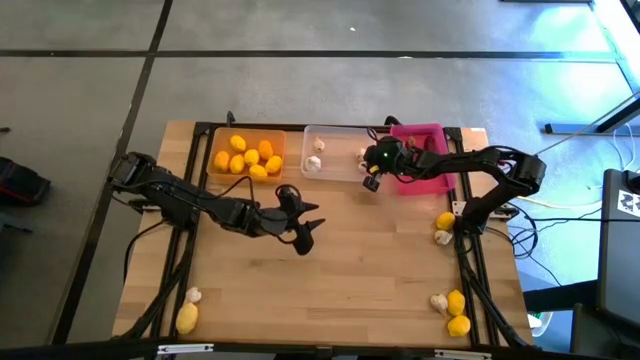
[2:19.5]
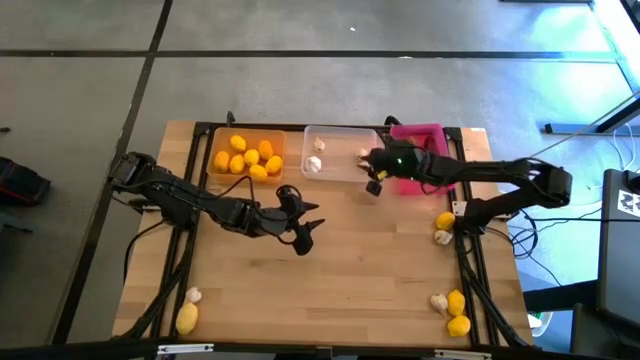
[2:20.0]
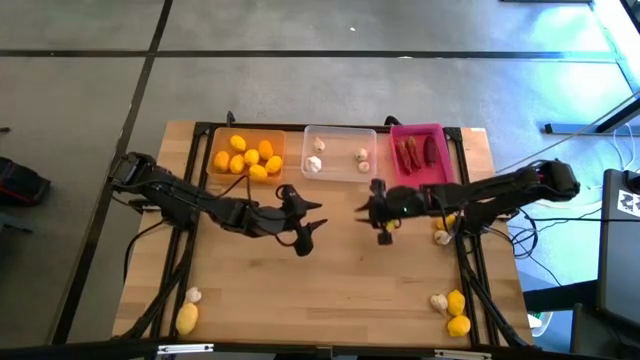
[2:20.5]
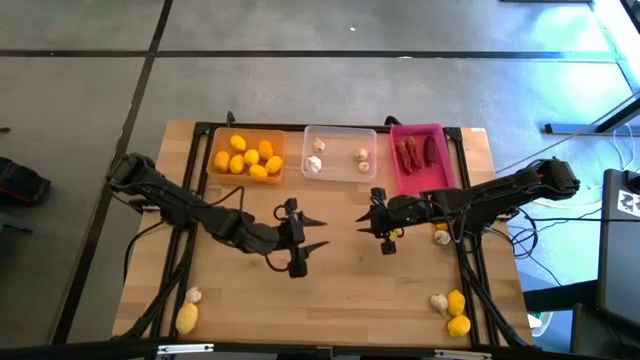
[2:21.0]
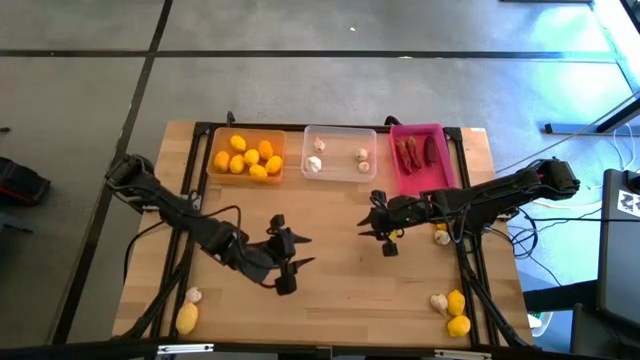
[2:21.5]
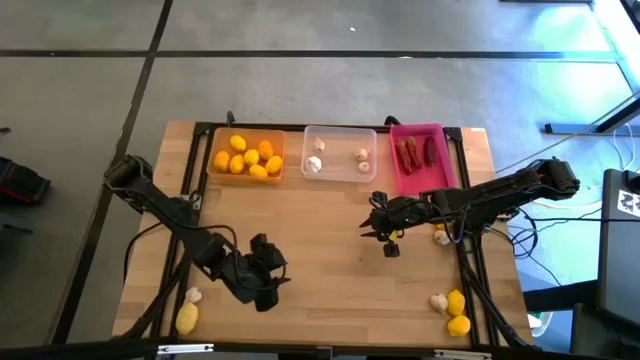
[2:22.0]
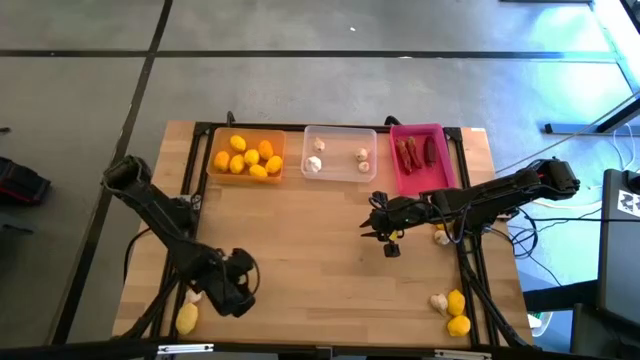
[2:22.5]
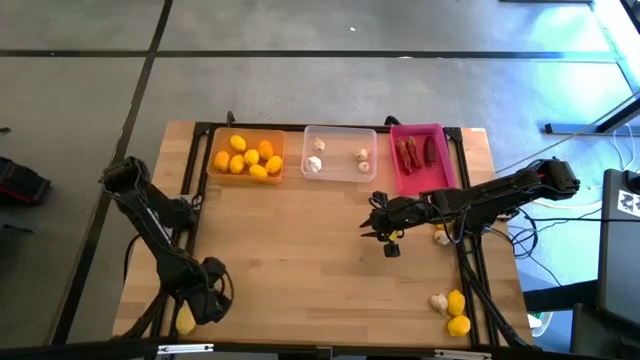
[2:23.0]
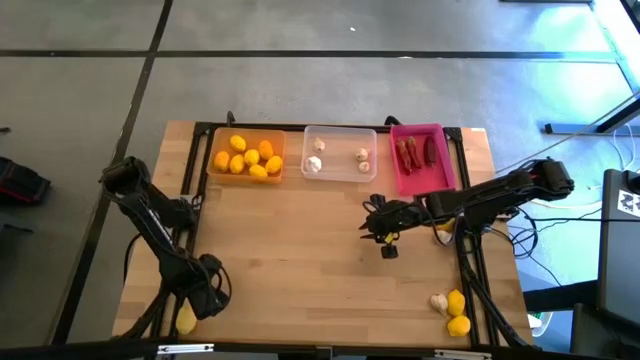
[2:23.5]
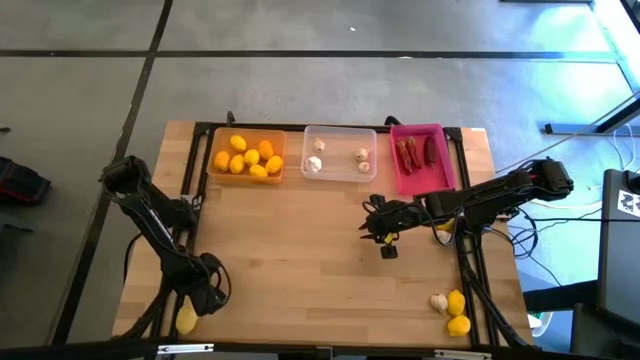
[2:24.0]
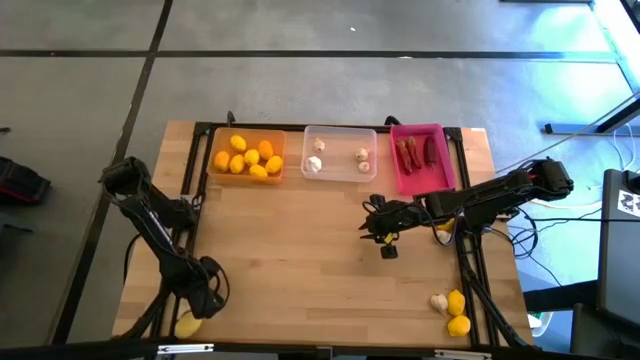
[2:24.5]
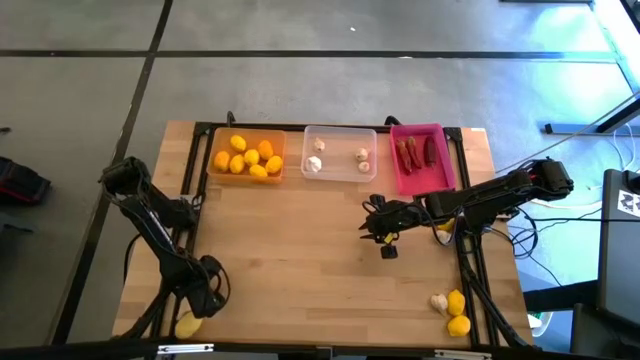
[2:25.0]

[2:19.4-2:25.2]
Task: Sort produce into baskets
Put the white garlic into the transparent bin

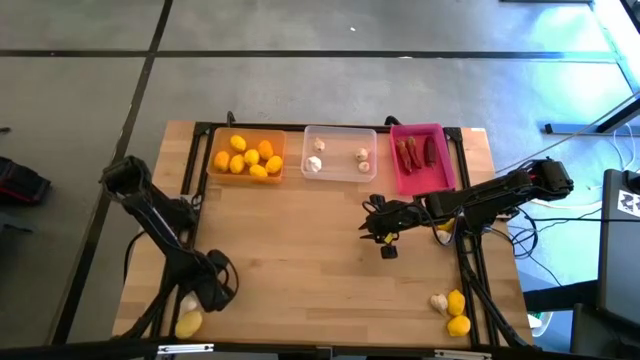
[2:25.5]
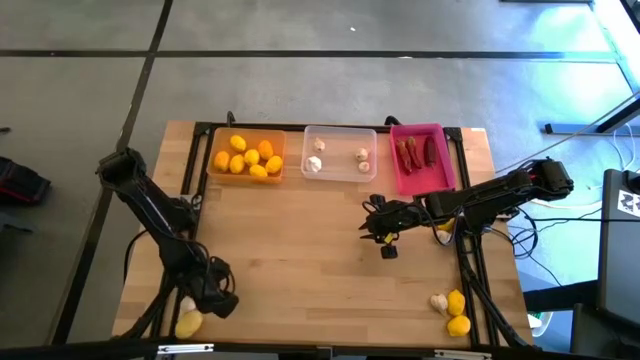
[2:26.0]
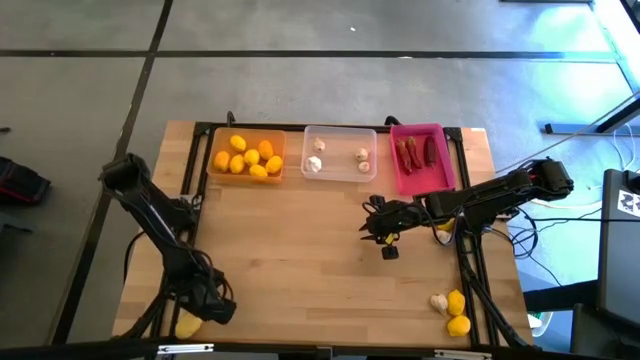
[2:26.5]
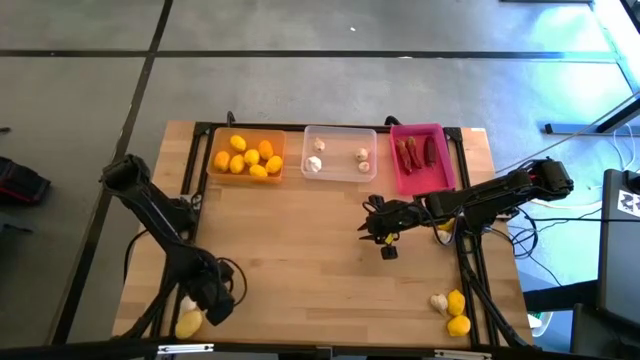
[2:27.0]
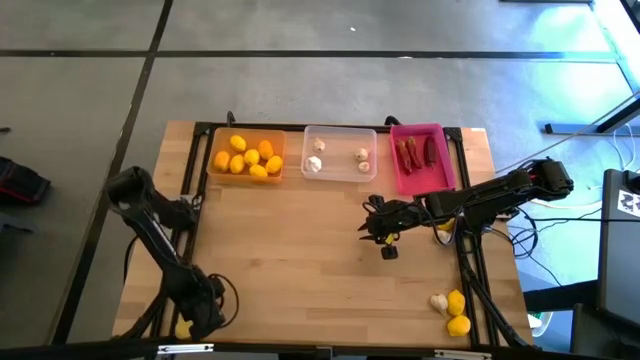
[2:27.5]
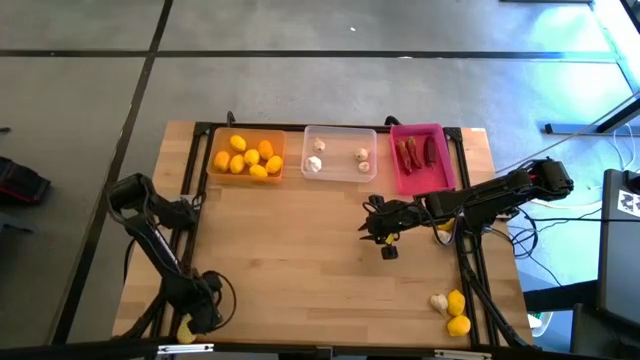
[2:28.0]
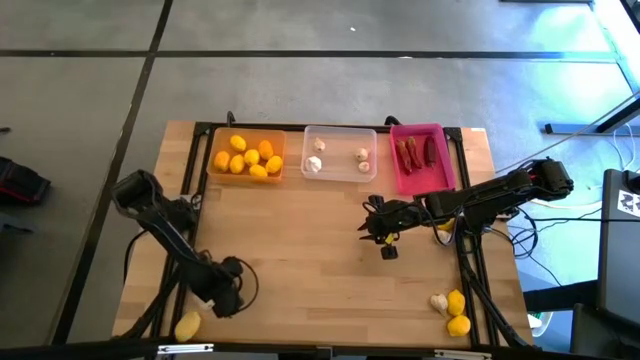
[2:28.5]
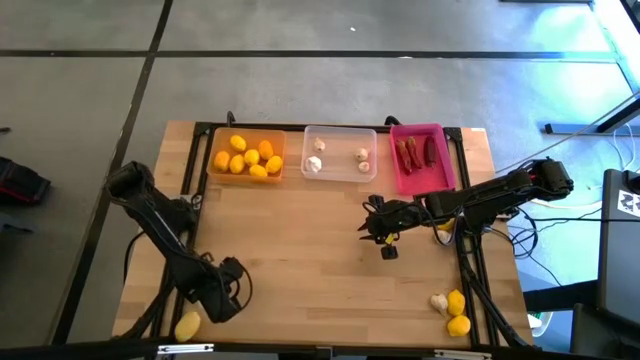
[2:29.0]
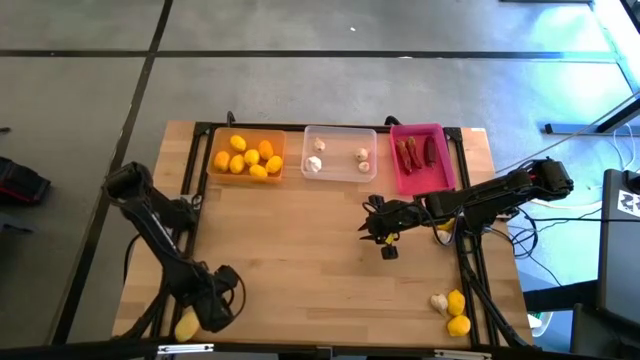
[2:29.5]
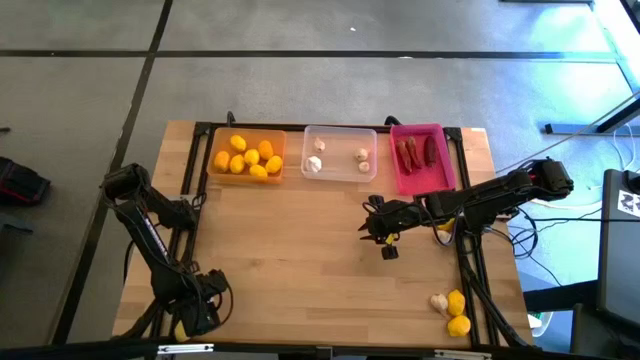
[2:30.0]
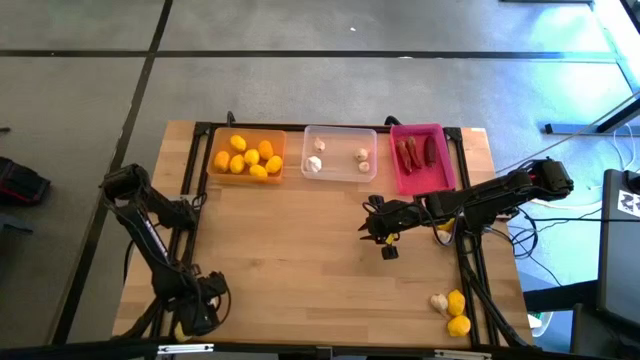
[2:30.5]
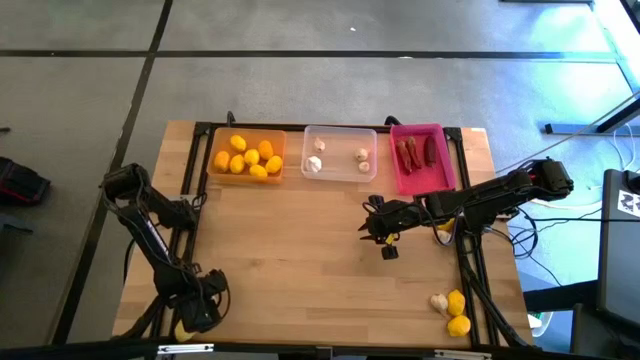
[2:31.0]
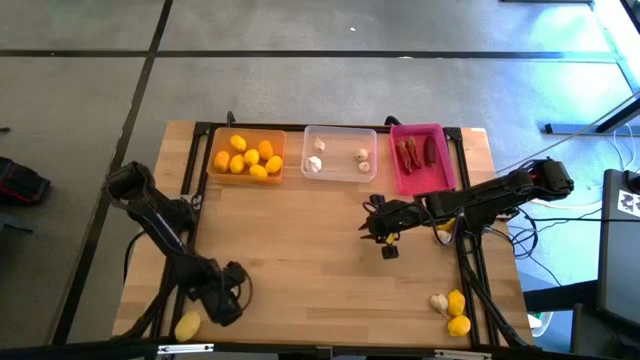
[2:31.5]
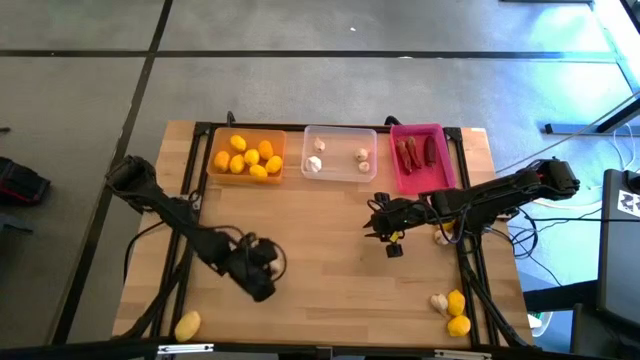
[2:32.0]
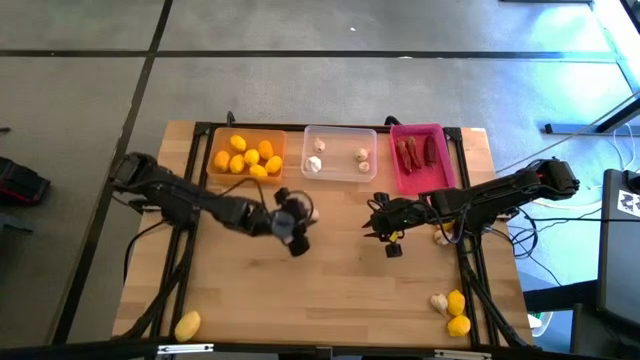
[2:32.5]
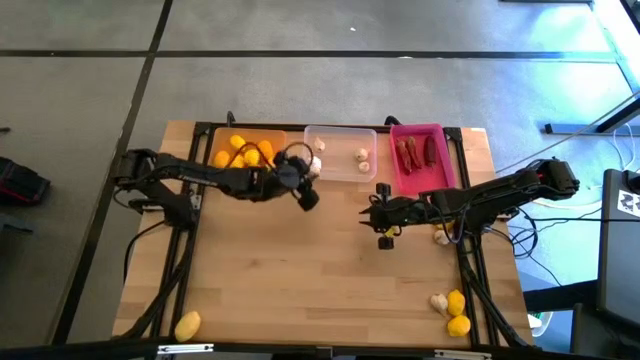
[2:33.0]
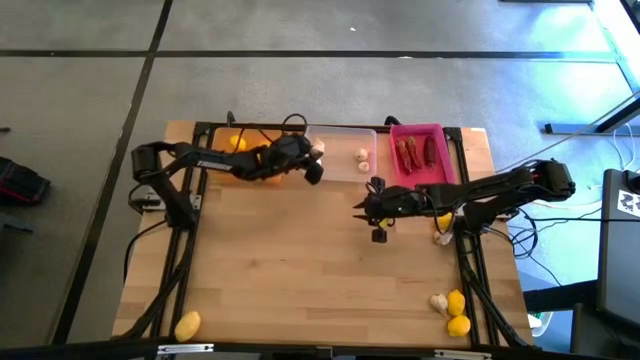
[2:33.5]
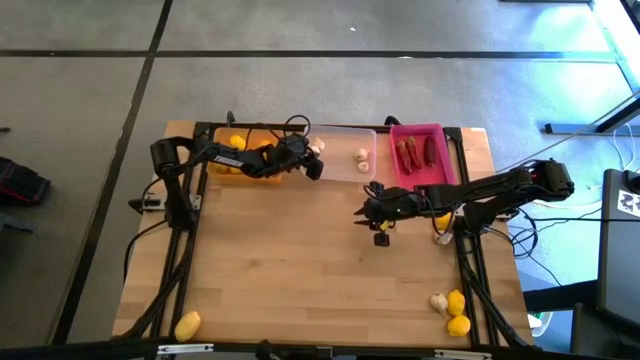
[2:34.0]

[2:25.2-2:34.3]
Put the white garlic into the transparent bin

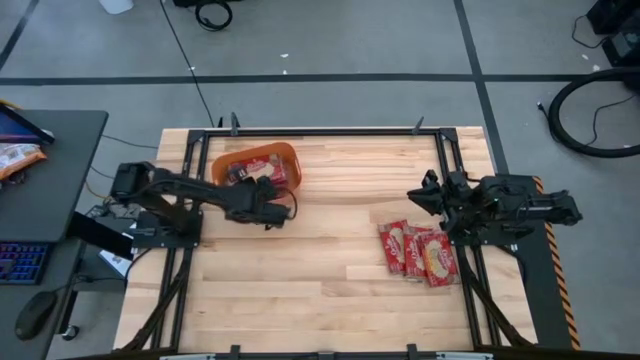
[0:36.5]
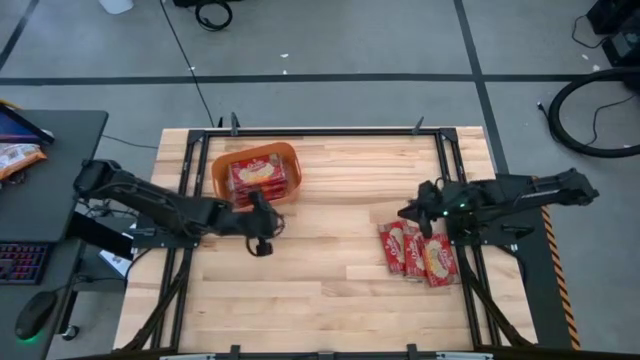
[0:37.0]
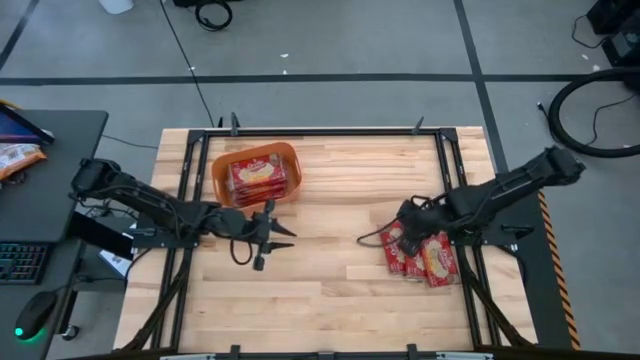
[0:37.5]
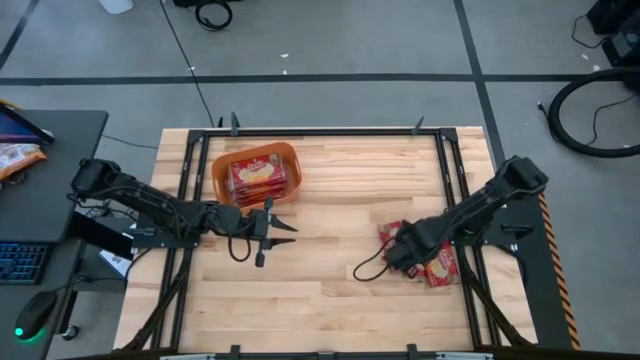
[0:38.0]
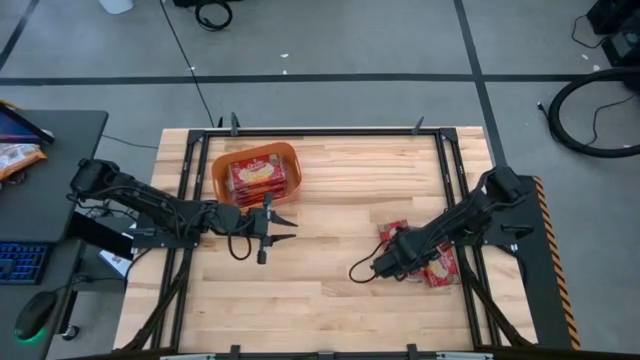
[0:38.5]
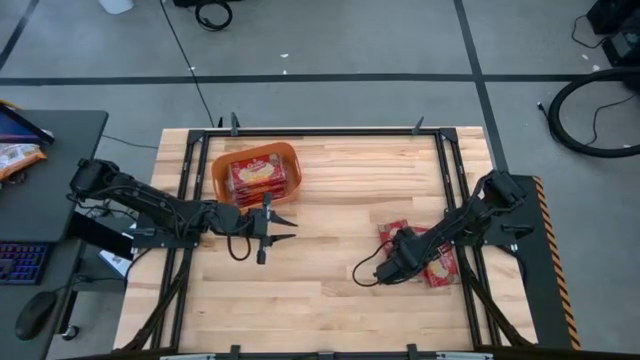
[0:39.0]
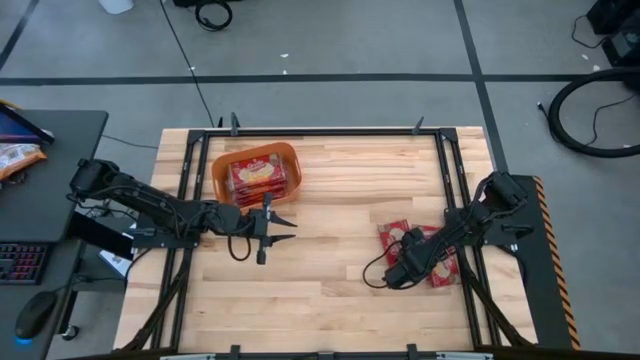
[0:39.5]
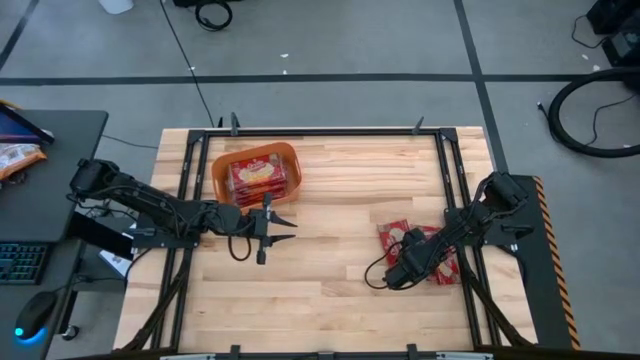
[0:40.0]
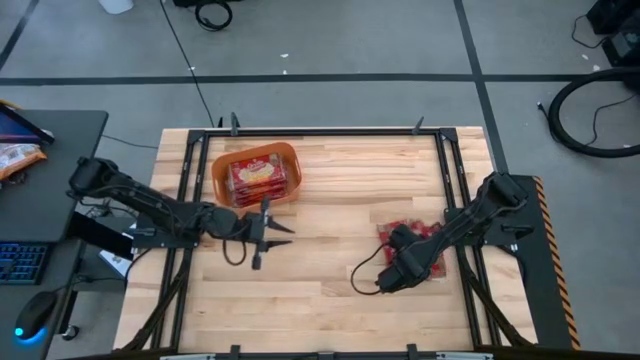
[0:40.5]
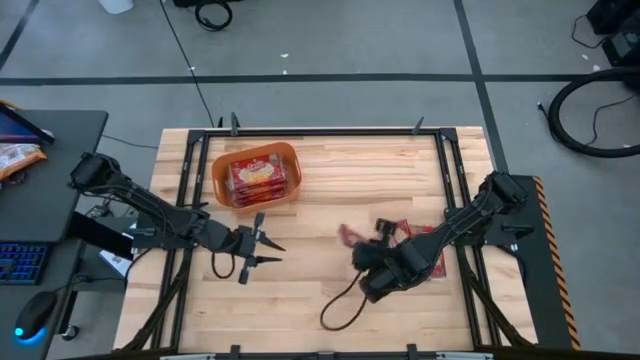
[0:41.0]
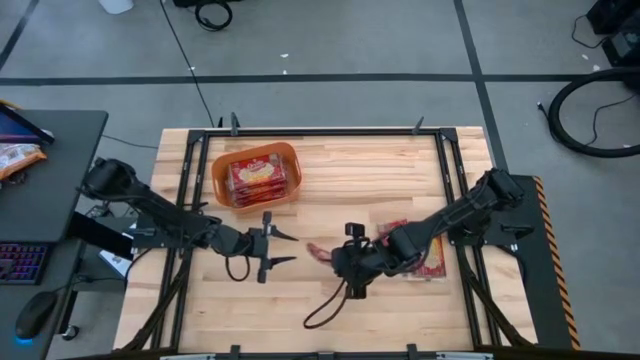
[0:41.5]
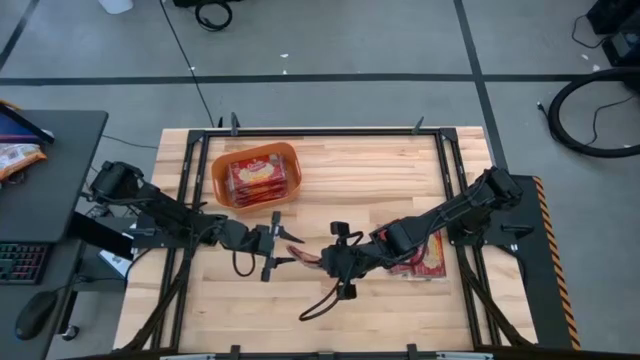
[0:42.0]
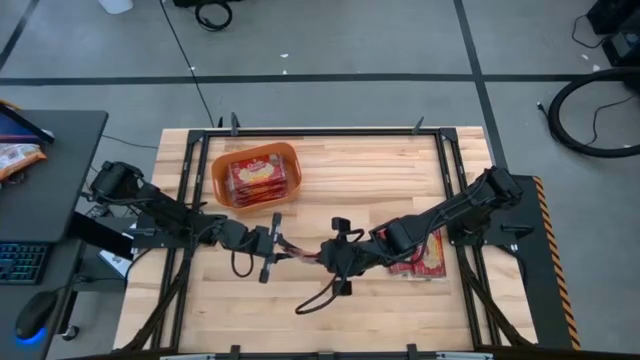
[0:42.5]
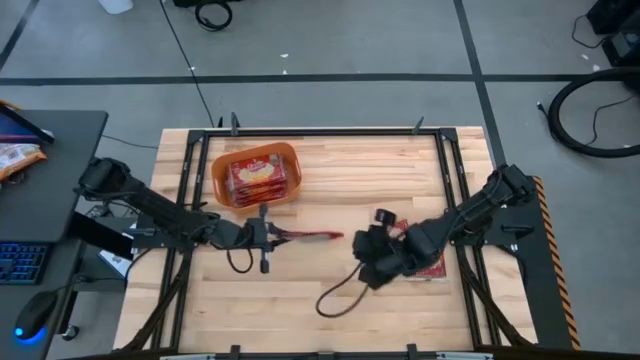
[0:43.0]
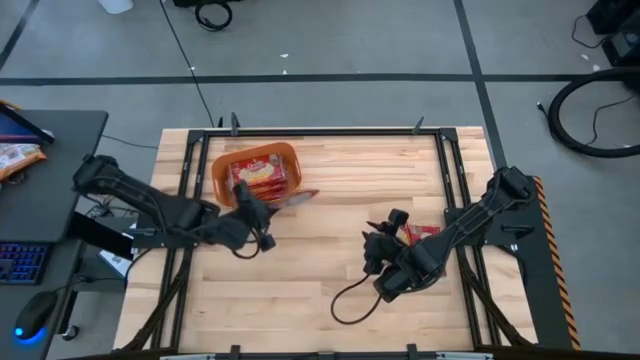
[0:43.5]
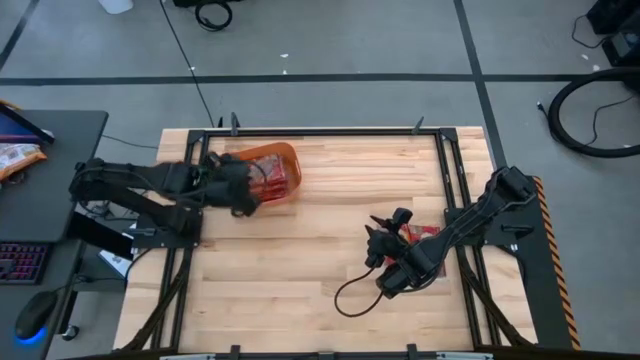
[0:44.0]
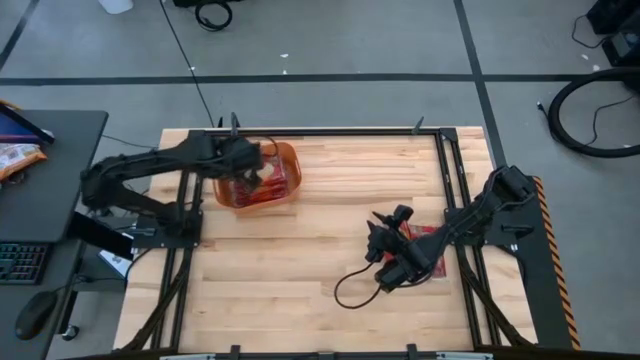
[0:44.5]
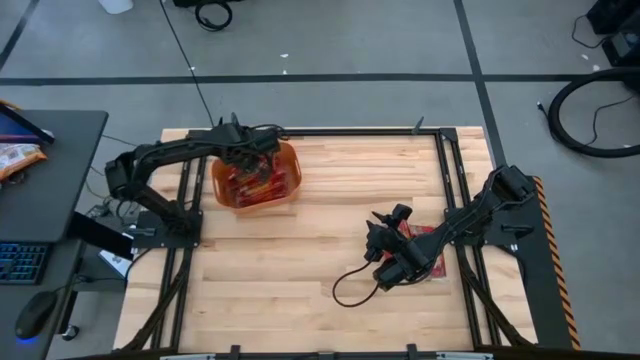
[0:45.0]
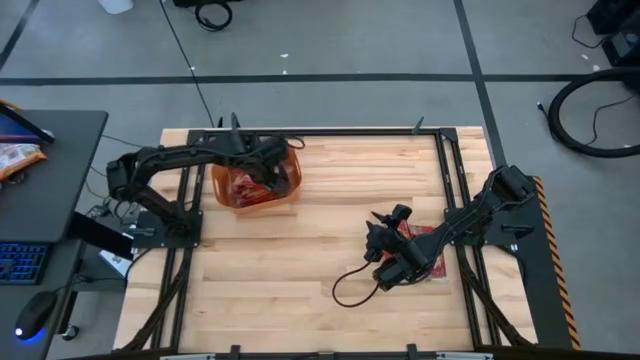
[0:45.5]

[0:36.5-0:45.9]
Task: Sort popcorn bags into baskets
Put the popcorn bag into the orange bin
